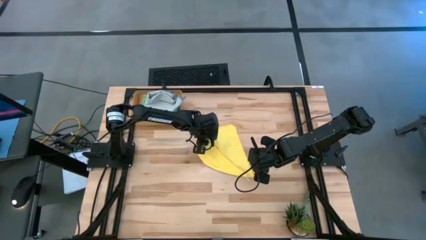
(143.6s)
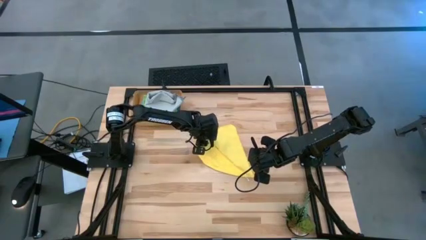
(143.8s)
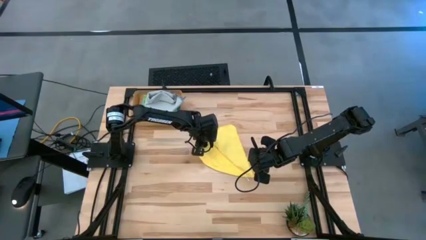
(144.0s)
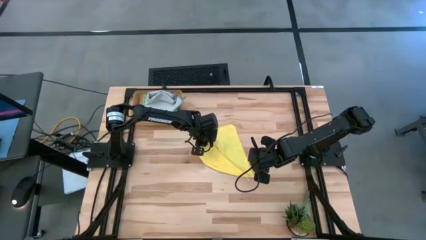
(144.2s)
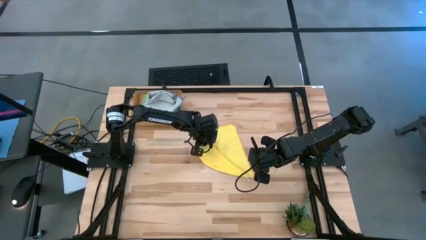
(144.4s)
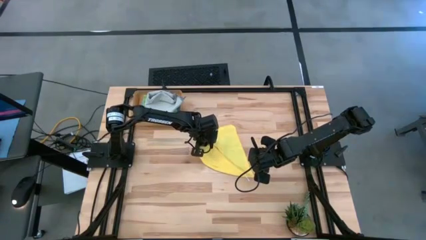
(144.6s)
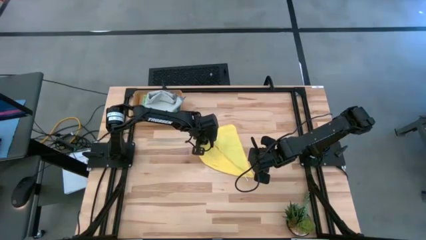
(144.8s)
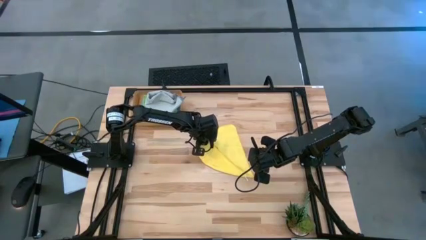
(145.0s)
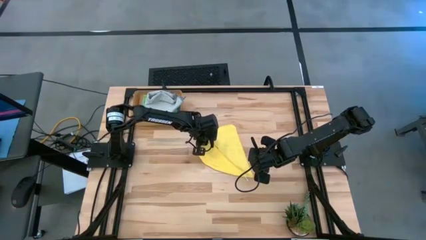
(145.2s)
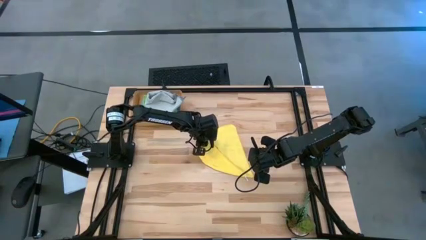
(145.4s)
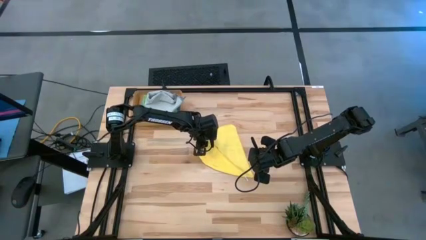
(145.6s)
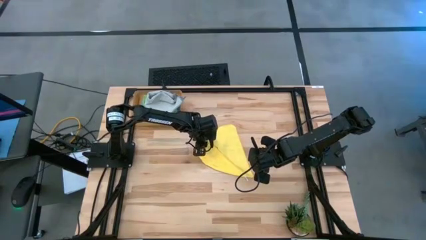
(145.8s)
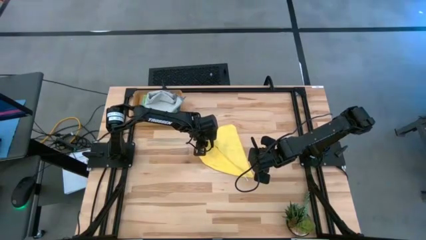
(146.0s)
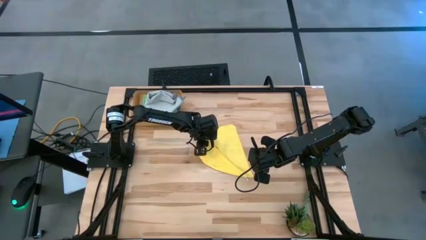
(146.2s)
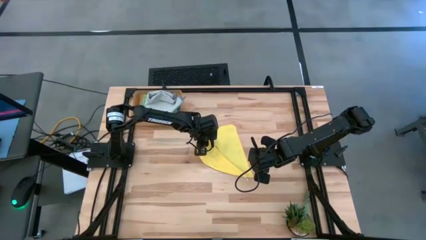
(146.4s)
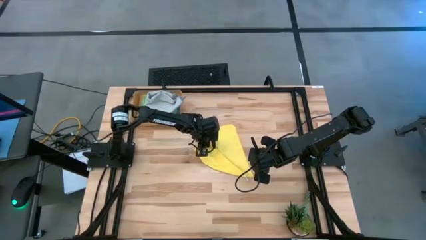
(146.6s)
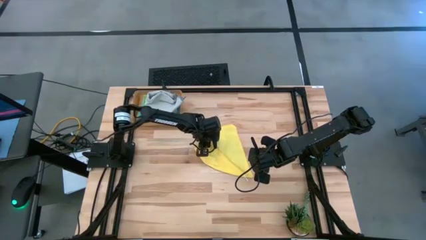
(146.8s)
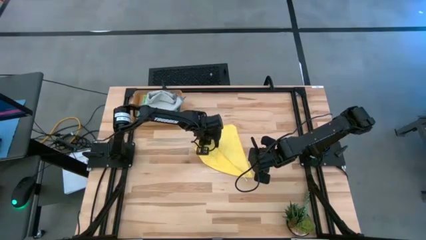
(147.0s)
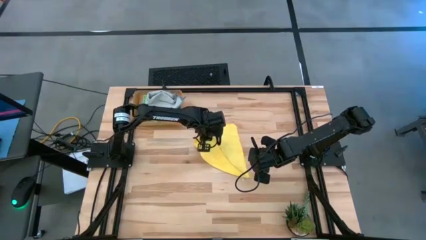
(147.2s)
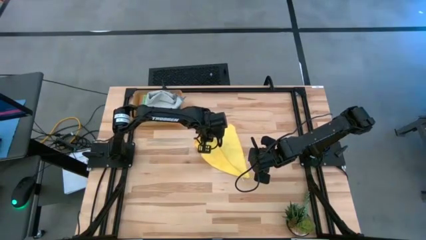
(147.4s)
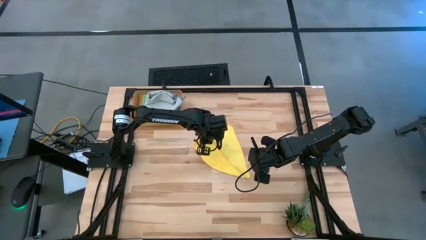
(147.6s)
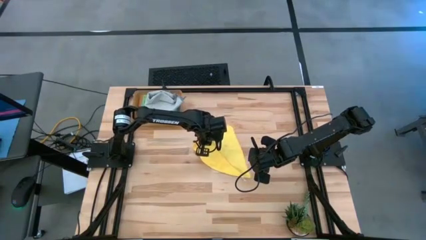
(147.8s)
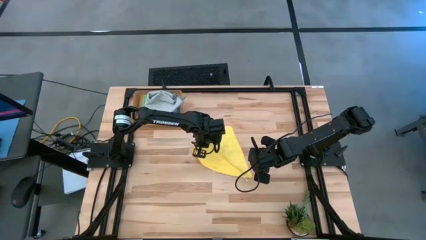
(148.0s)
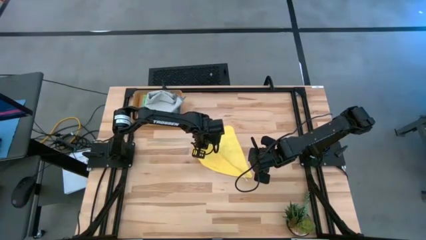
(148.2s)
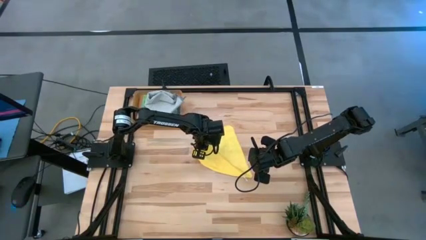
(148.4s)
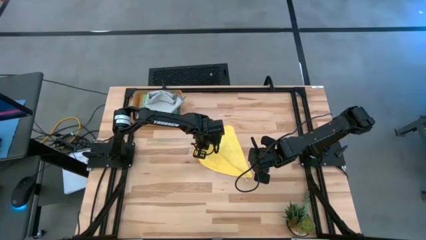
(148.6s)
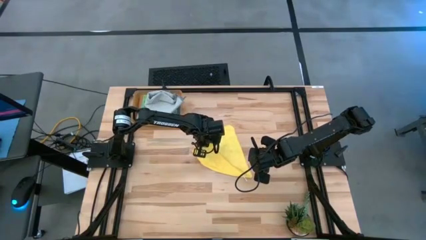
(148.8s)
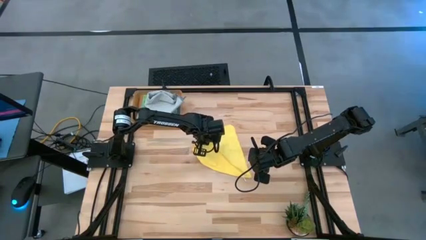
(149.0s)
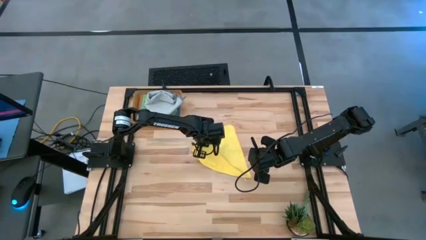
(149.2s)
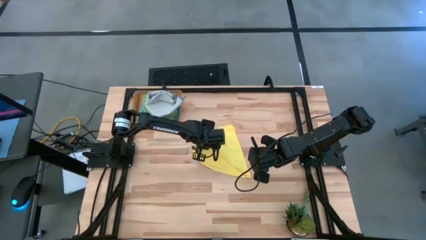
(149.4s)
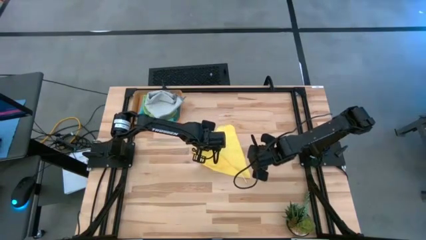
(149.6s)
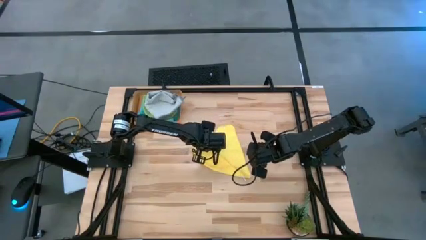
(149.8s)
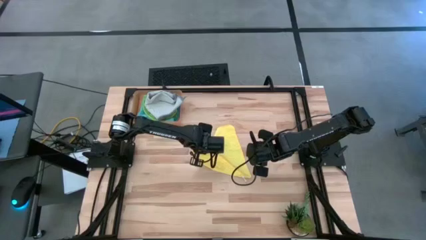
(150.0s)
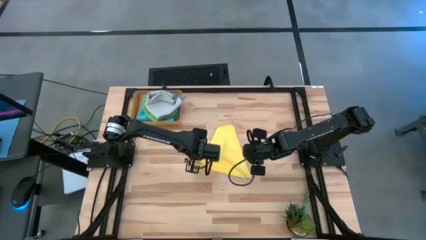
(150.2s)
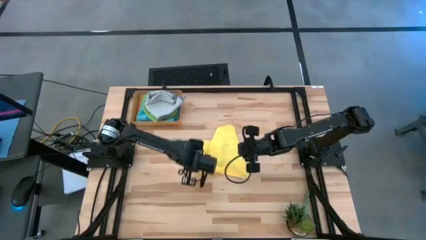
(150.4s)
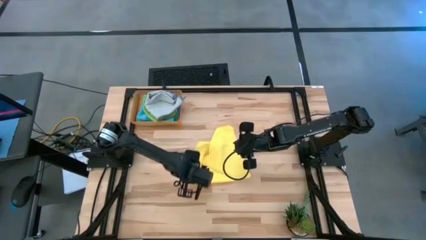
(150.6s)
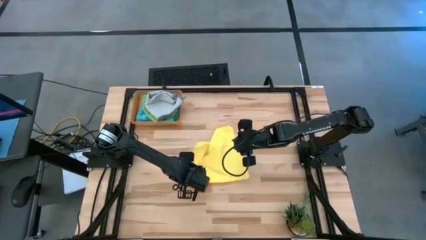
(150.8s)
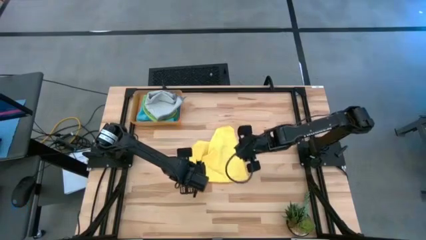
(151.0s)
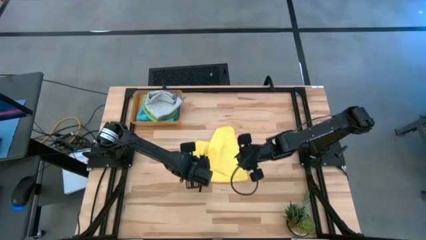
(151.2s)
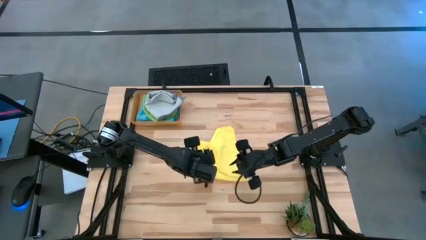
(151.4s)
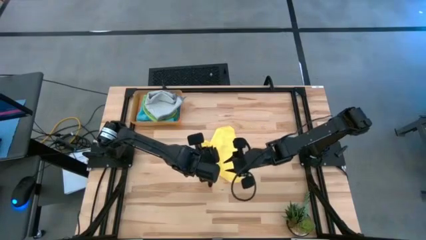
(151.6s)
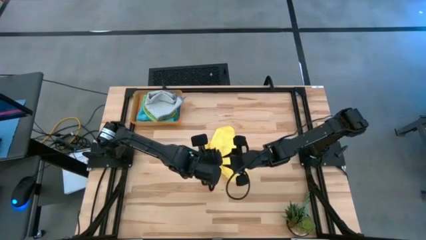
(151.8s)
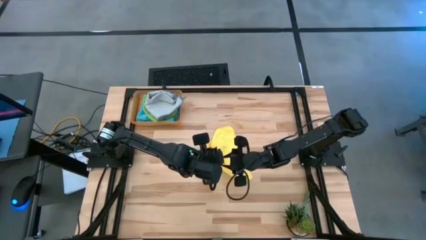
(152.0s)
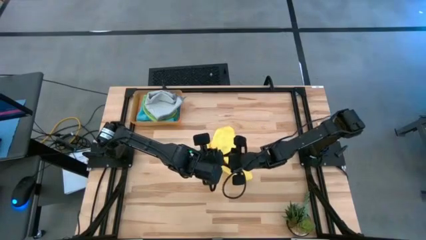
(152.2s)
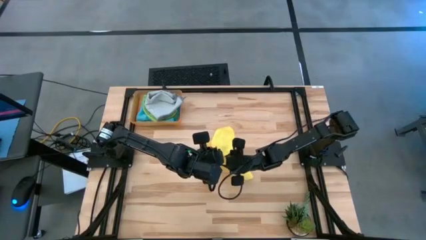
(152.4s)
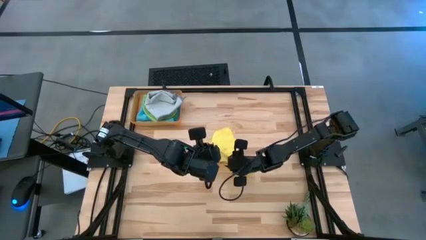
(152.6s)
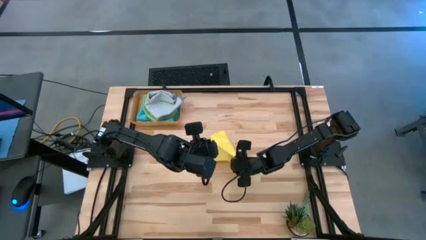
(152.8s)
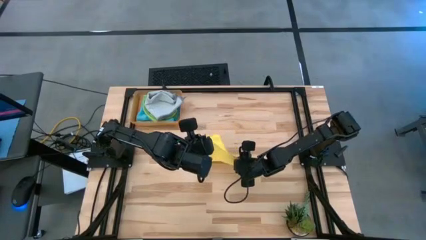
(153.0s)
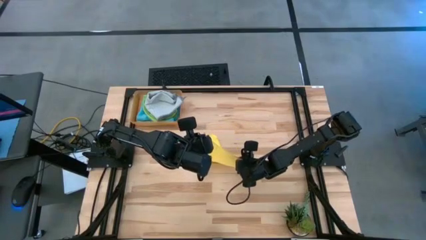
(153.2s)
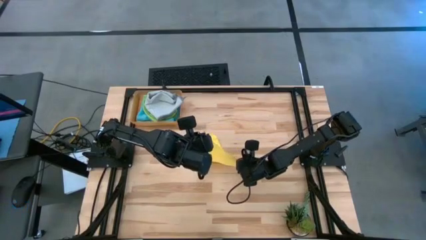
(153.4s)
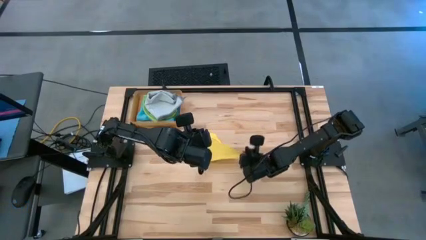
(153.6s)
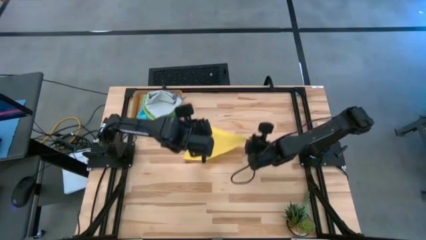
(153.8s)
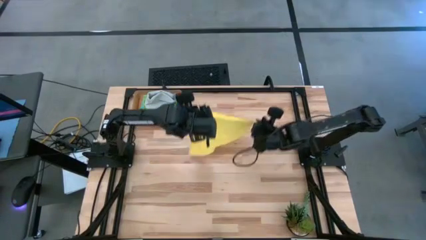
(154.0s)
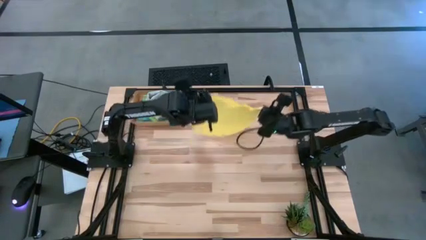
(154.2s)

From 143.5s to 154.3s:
Task: Fold microfiber towels
Fold the yellow microfiber cloth

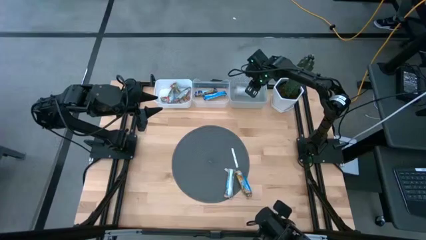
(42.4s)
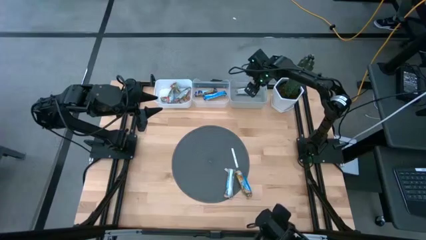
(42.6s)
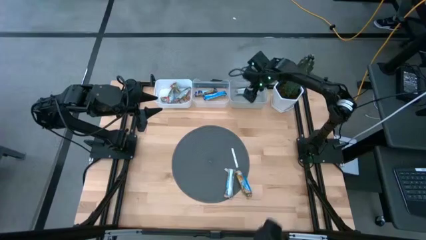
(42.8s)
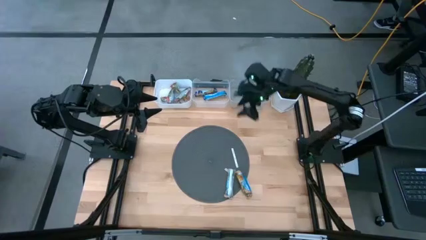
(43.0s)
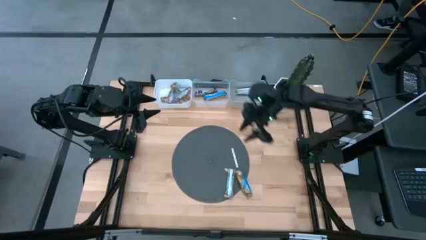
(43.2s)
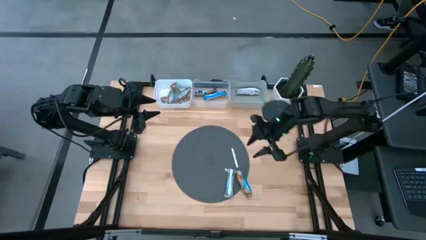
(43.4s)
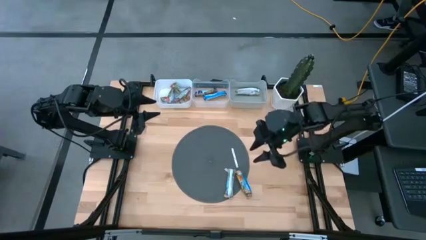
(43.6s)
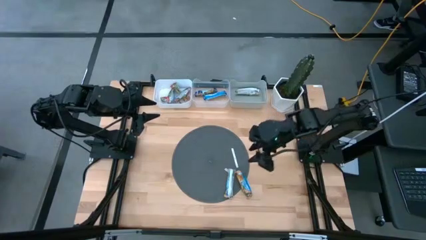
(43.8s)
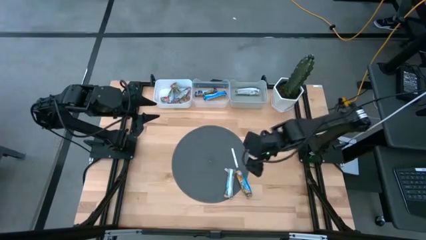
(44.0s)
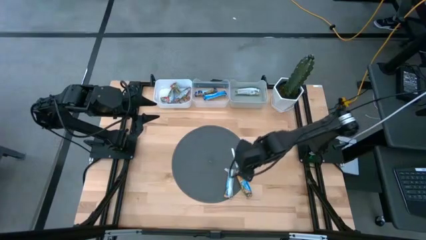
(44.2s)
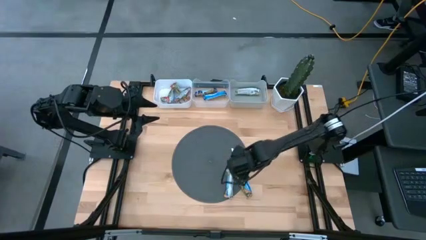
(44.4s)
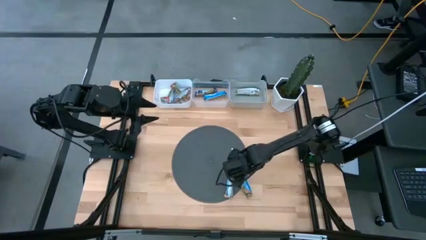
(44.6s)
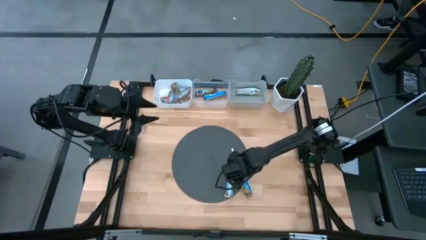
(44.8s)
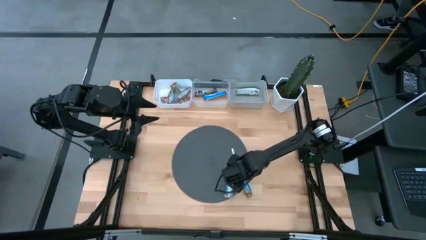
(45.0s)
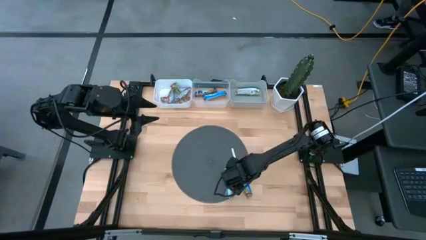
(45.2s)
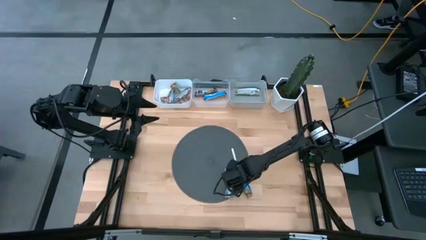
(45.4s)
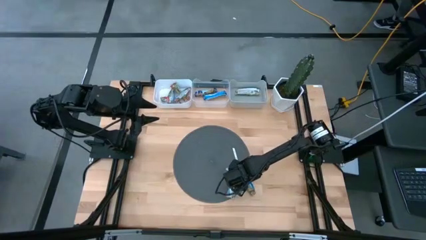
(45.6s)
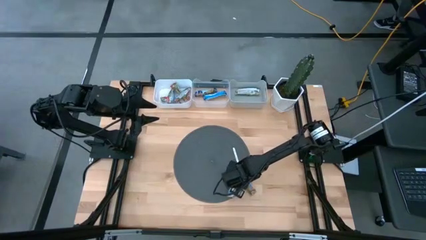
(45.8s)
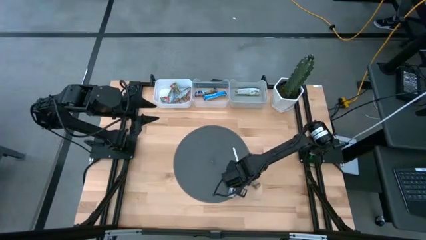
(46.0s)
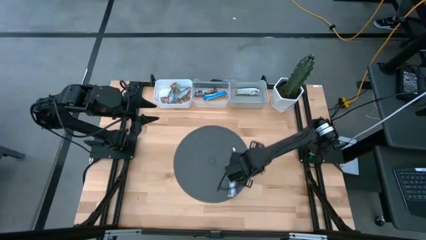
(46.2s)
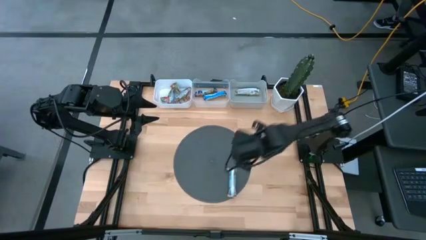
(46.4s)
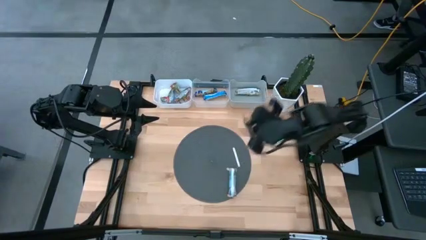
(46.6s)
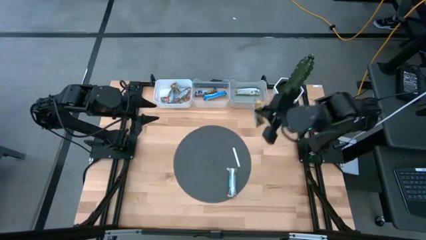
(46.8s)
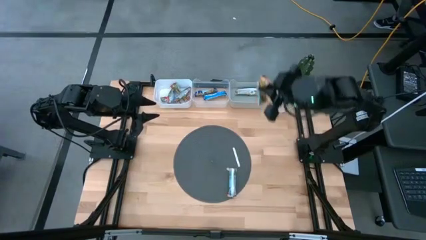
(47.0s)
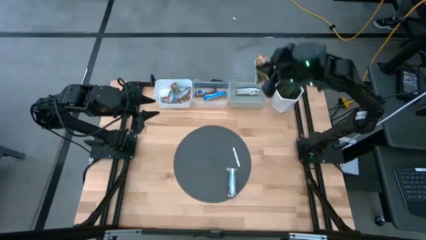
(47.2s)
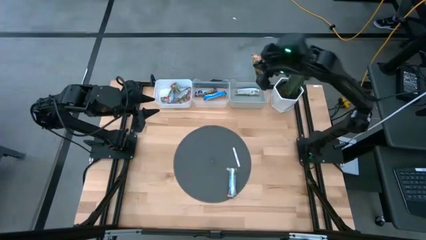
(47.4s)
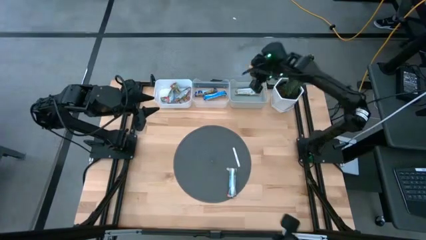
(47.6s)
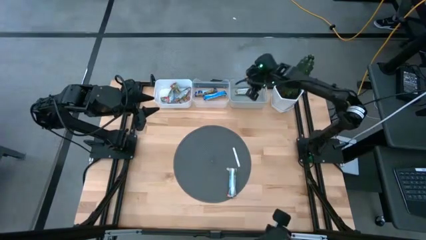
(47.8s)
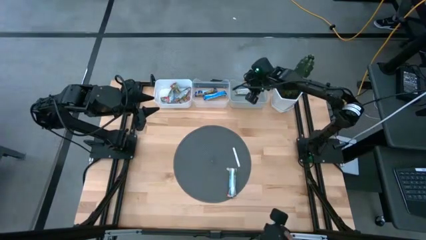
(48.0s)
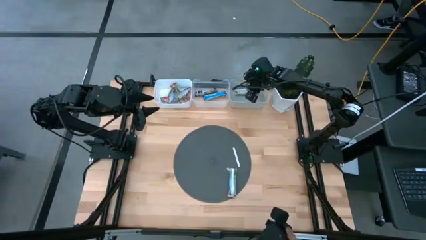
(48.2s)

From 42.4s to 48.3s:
Task: Pick and place Granola Bars by type
Put the orange granola bar into the gray bin
